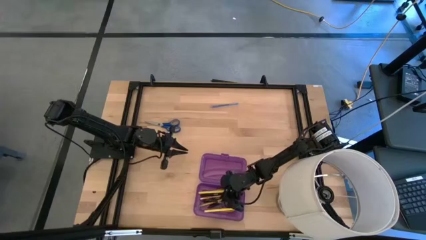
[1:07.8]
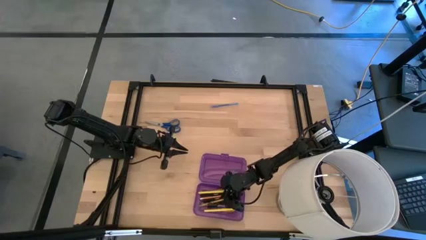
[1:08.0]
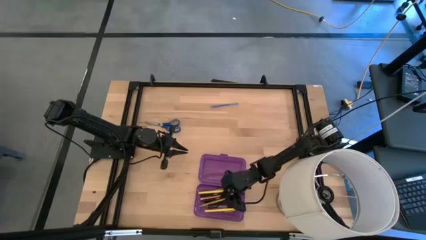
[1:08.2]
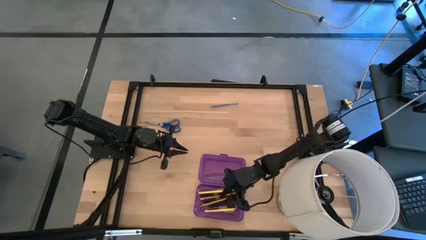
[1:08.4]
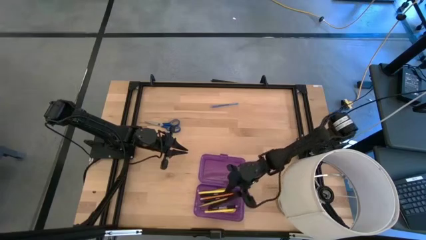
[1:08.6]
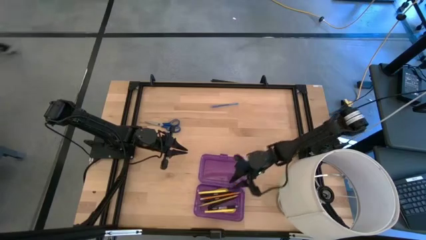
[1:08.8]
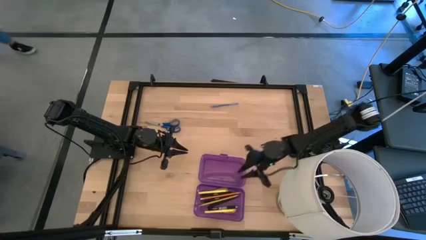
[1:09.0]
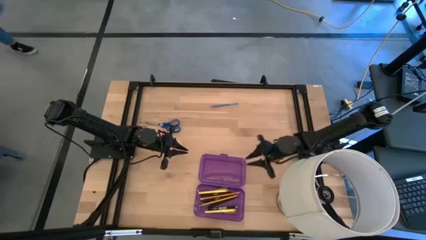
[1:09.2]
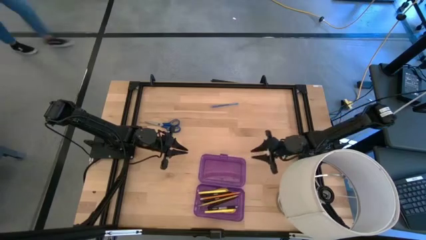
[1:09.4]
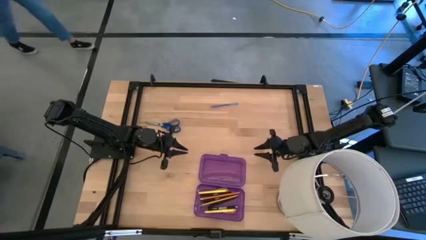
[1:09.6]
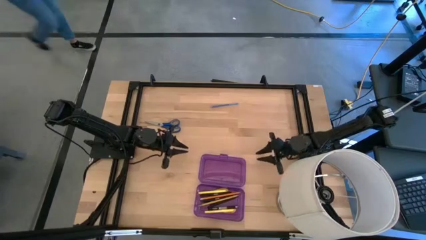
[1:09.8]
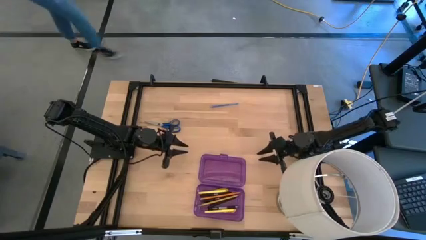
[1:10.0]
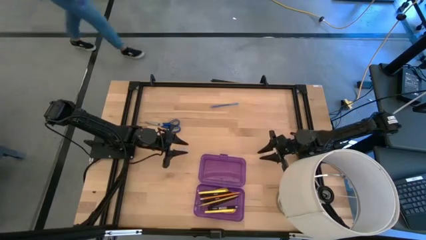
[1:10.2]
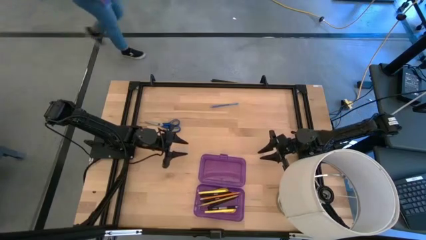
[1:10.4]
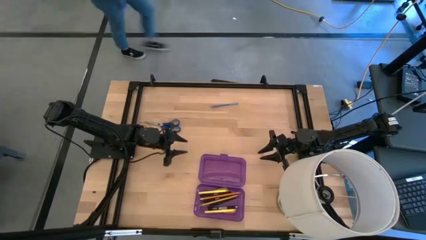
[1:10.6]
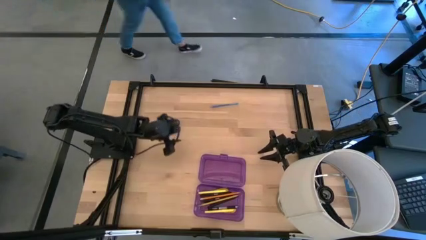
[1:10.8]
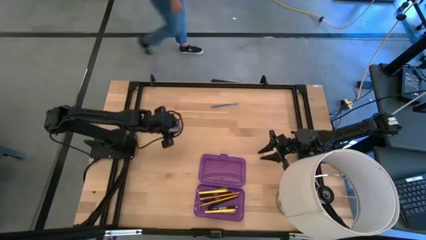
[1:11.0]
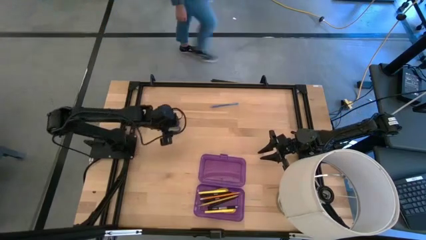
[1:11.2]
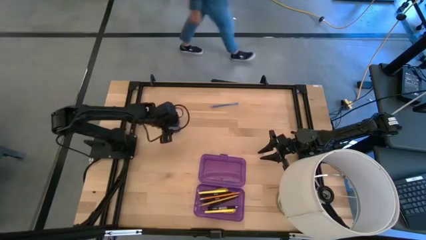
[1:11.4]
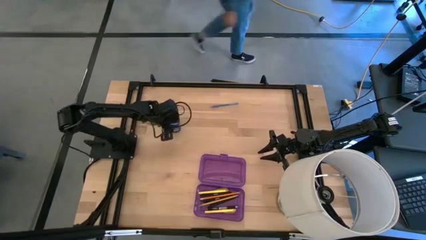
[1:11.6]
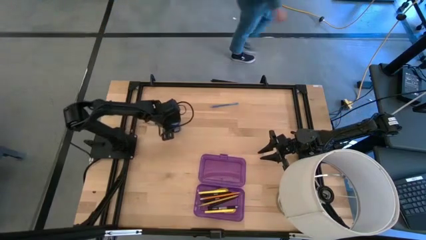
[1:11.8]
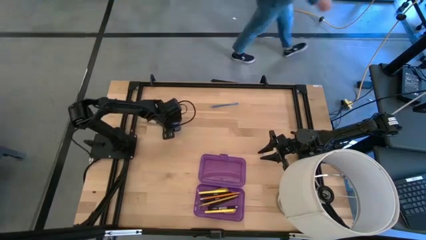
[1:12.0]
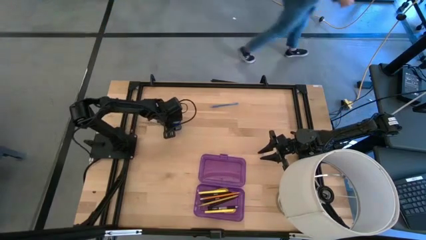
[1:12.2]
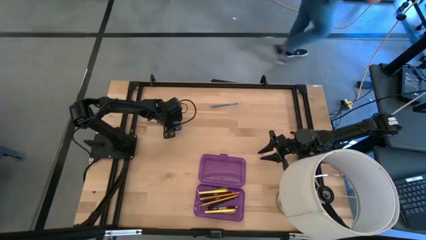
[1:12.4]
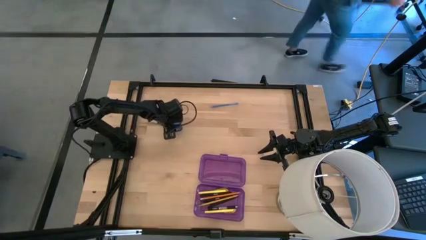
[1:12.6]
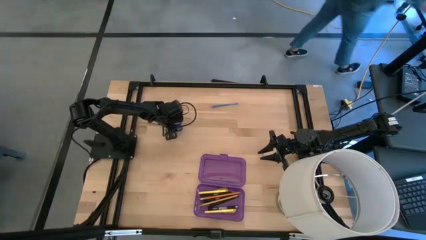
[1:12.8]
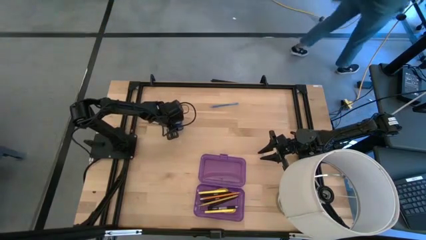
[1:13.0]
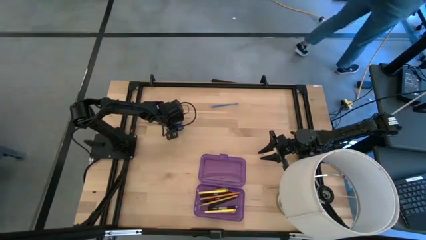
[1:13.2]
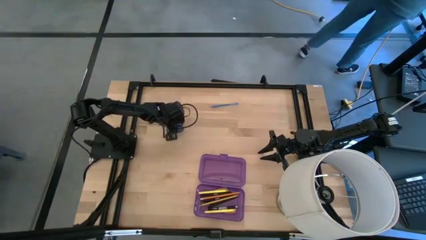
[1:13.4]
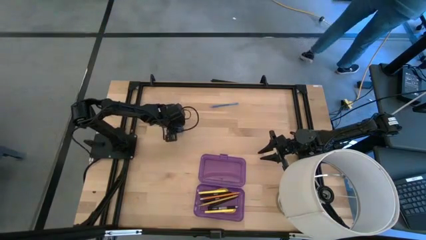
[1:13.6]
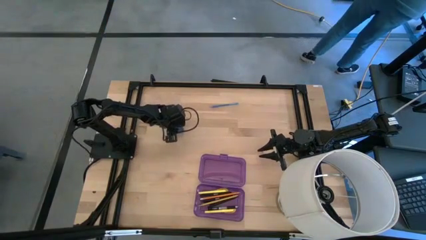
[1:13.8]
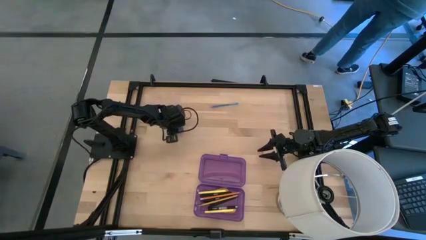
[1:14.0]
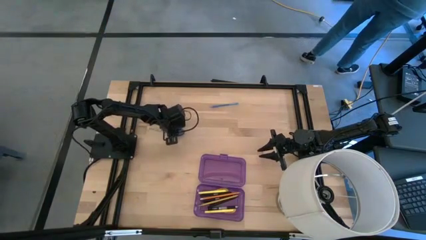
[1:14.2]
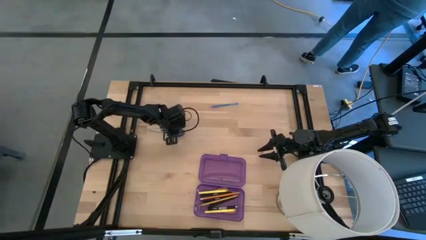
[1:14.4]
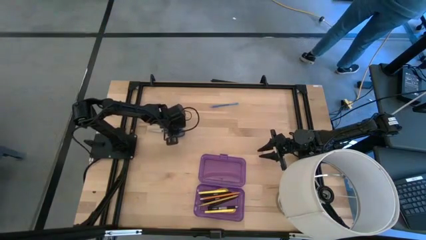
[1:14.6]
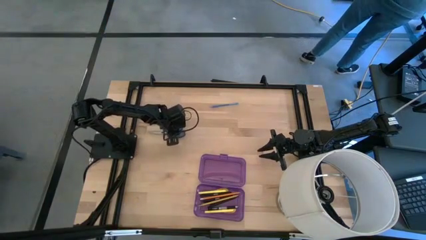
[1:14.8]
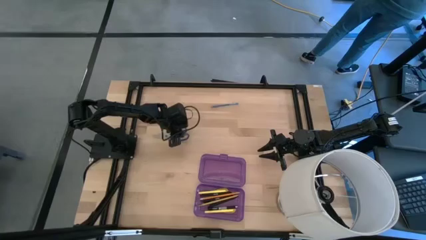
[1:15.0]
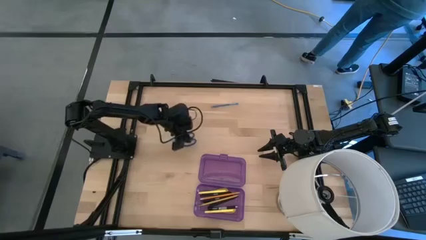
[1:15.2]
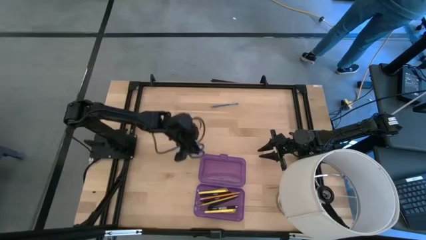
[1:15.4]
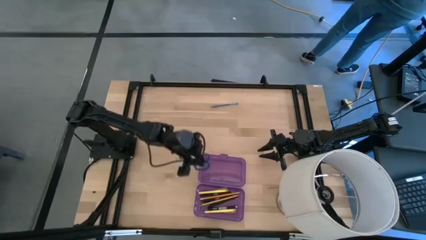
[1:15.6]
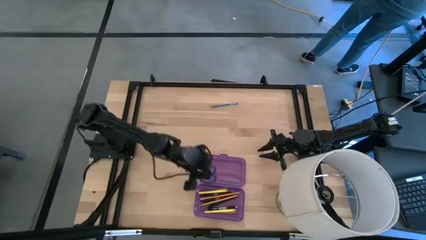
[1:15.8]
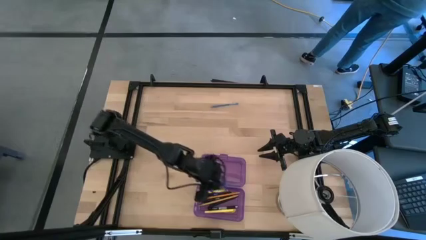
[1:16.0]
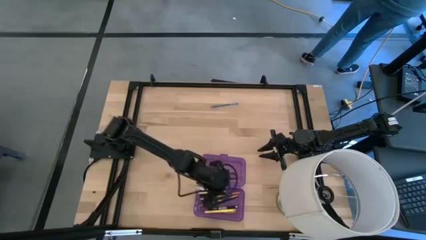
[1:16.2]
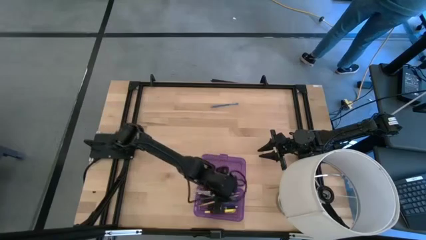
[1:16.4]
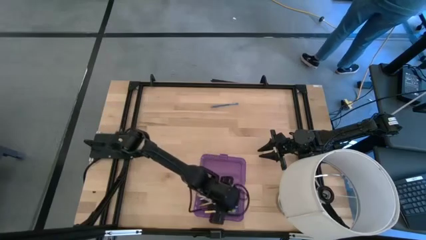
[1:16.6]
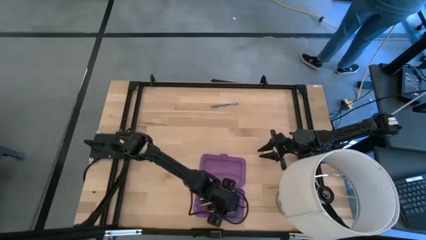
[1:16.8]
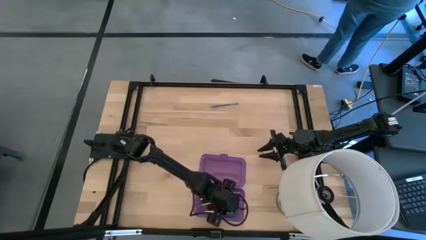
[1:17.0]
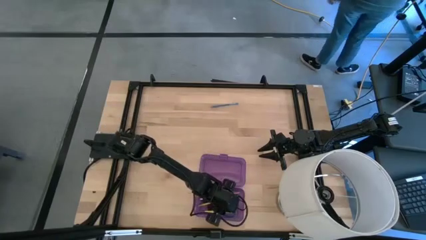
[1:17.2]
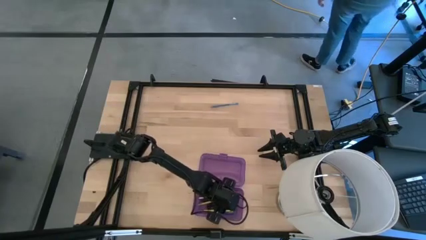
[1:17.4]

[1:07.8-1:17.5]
Task: Pick & place school supplies into a supply box
Put the blue scissors into the violet supply box

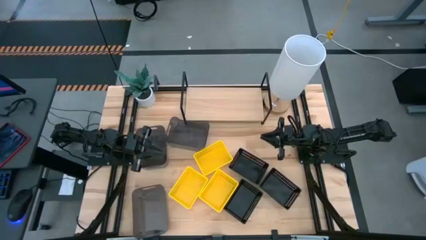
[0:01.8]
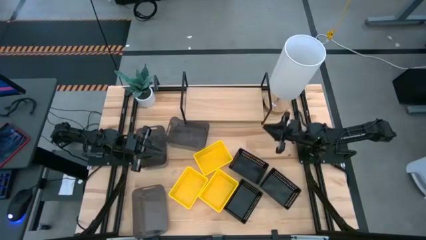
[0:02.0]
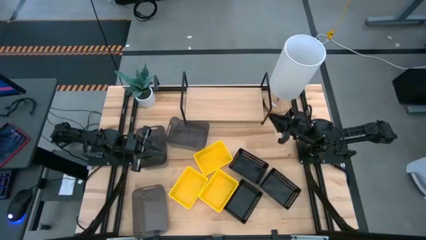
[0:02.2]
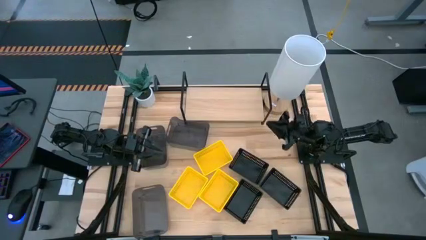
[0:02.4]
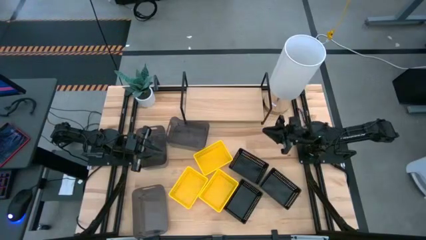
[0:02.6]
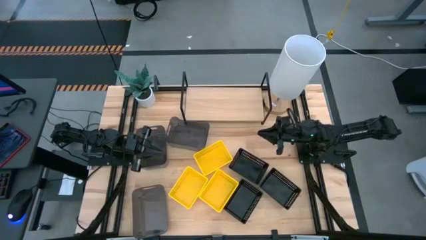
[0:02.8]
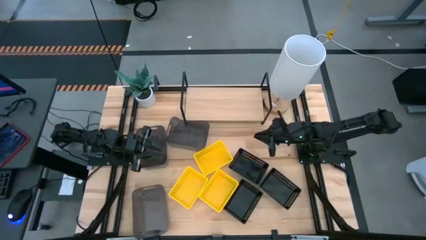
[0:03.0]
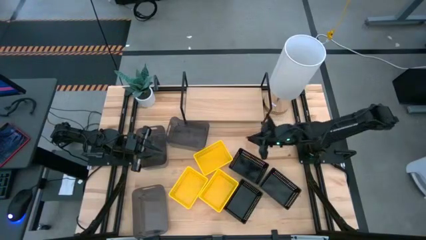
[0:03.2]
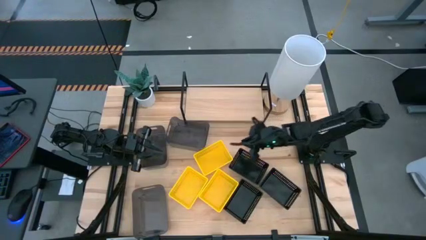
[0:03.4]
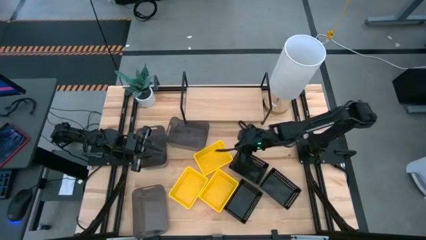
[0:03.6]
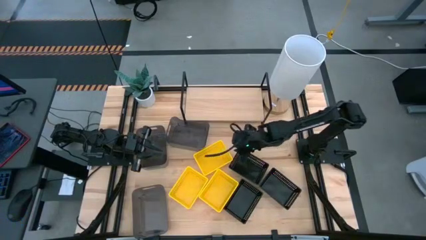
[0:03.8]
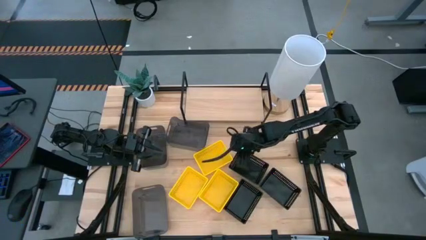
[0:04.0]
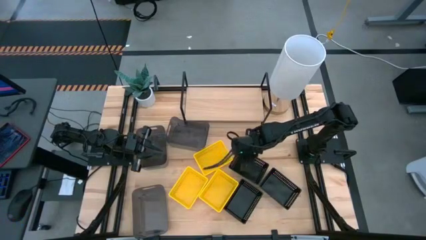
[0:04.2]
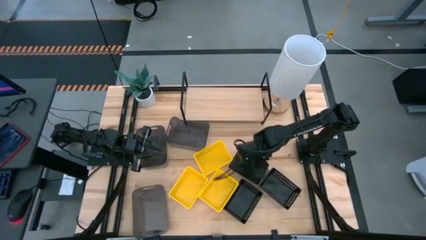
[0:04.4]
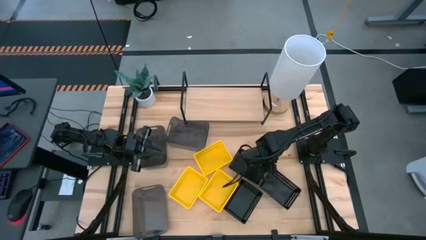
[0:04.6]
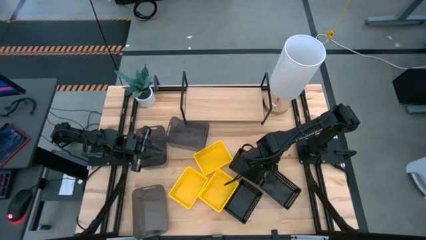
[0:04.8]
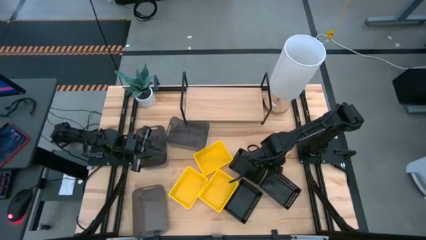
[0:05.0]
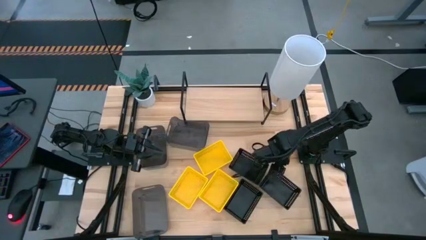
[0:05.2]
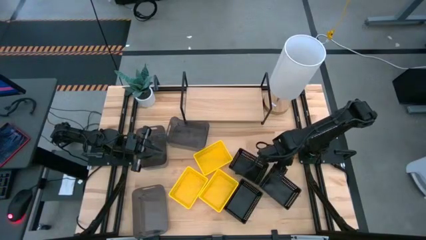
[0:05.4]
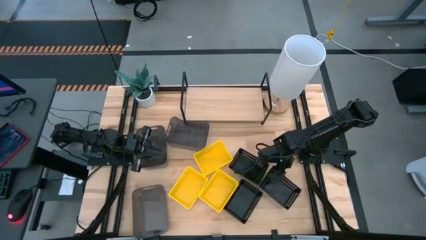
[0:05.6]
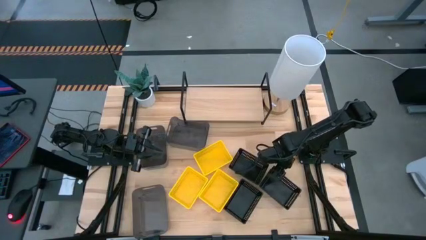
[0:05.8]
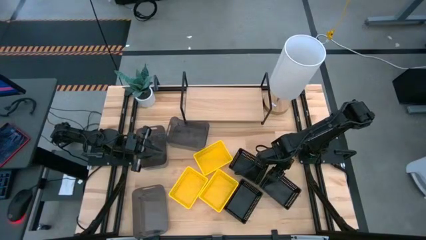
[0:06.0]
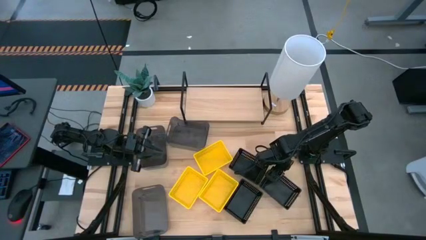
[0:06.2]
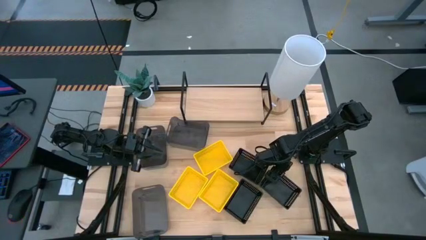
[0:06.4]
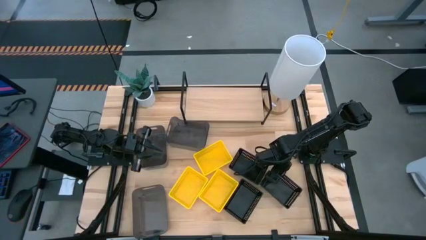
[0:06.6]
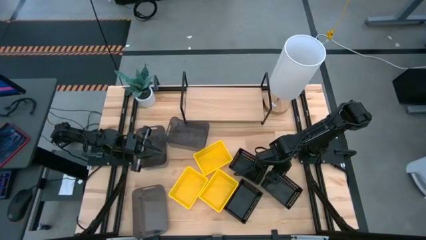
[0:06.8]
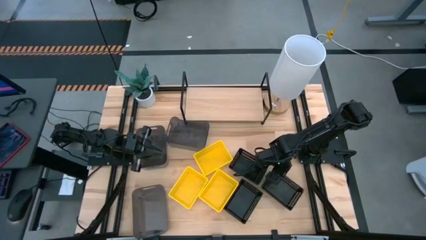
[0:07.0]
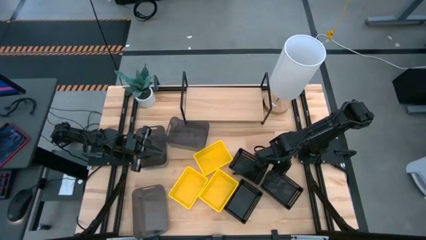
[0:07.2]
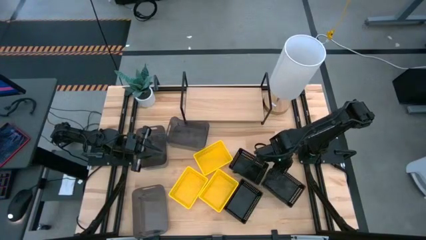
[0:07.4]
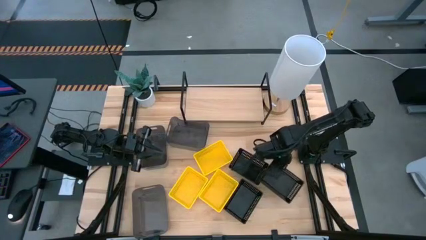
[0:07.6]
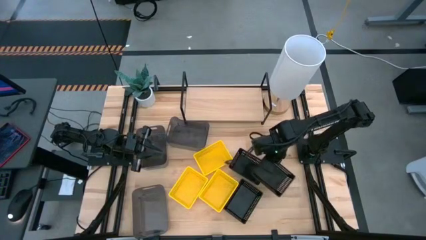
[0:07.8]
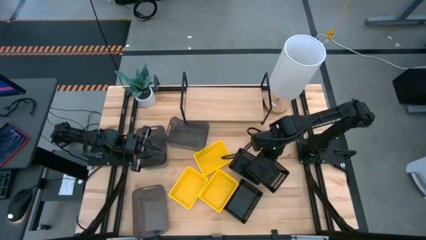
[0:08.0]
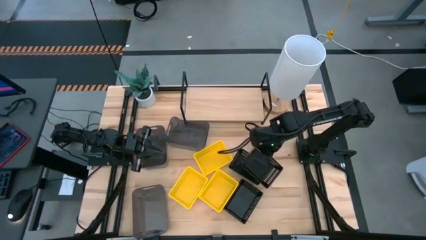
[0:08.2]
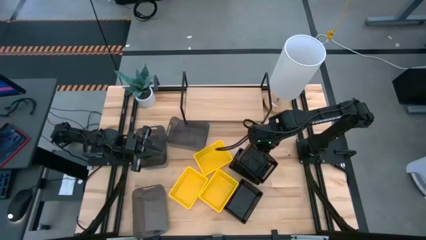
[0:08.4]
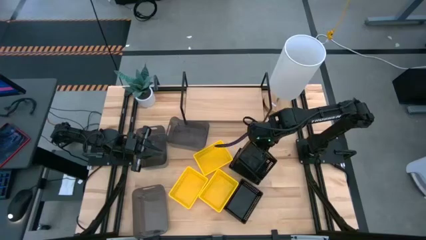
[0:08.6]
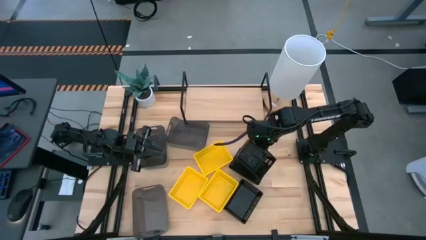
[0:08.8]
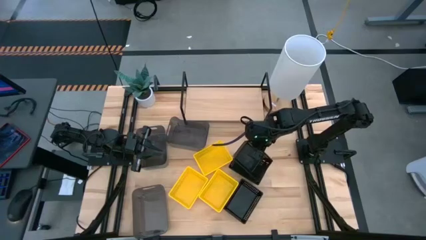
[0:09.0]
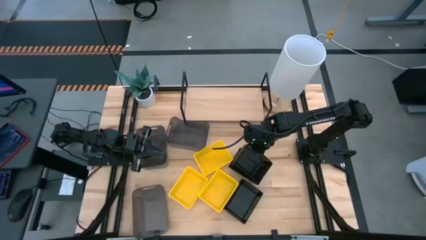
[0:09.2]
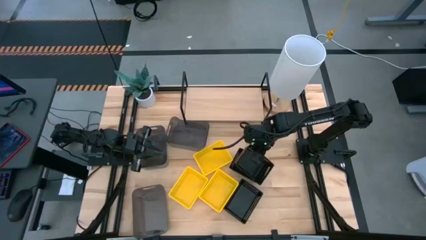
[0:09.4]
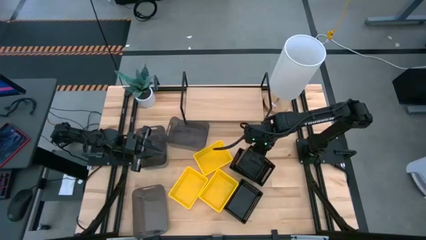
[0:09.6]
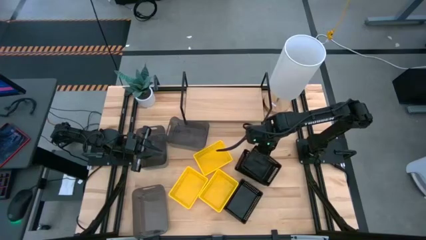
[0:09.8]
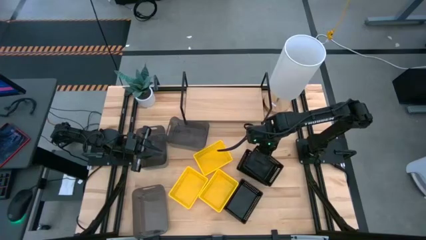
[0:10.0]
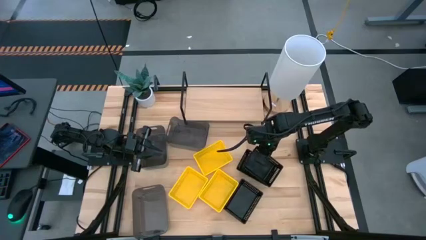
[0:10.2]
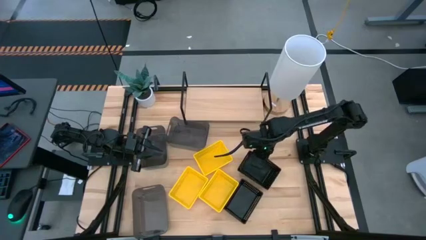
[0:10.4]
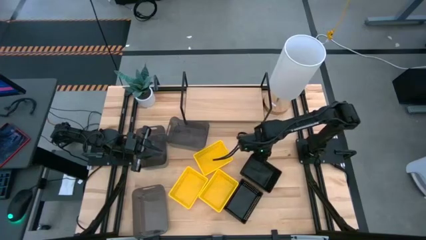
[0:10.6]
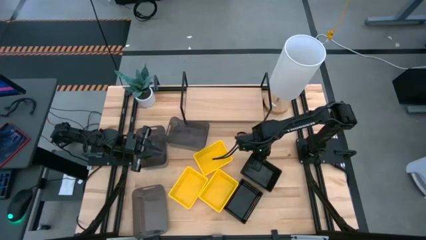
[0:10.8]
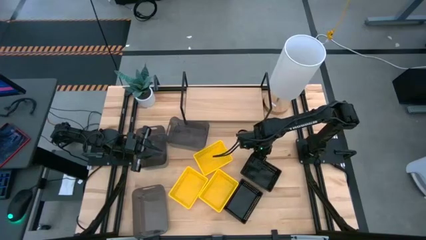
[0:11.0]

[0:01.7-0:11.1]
Task: Stack baskets on shelf by color
Stack the bottom right black bin on the top black bin
